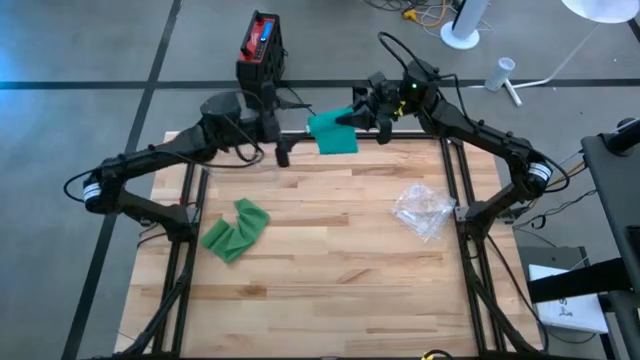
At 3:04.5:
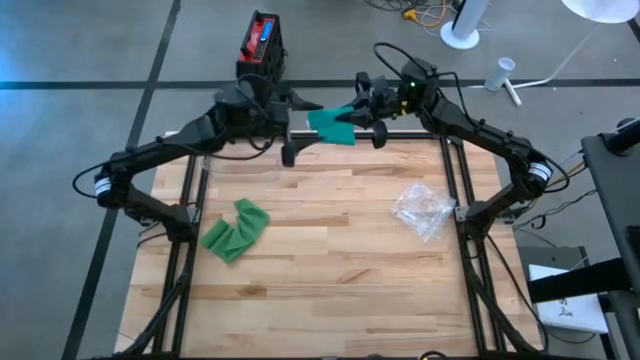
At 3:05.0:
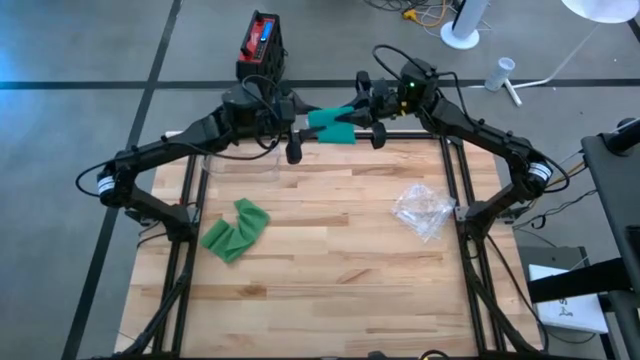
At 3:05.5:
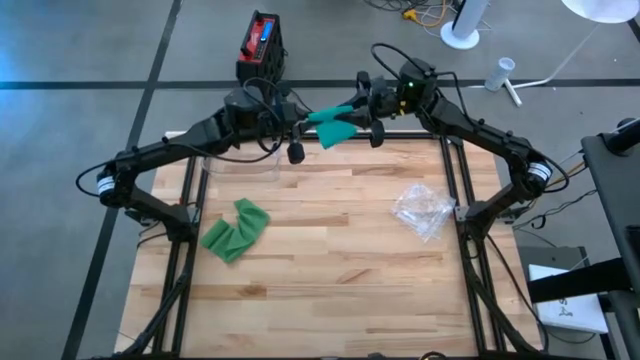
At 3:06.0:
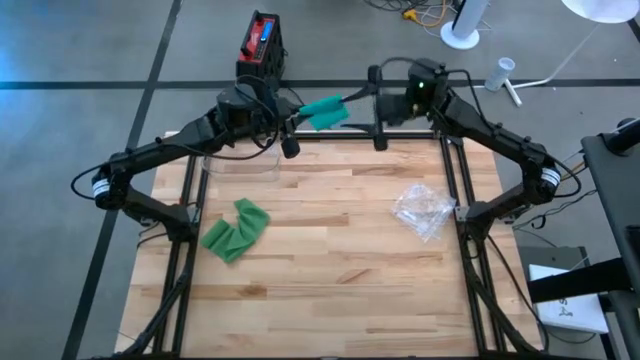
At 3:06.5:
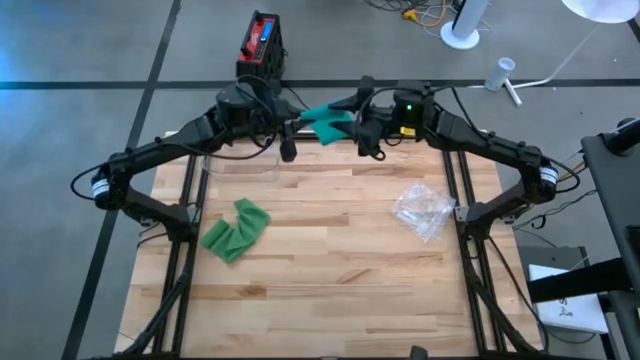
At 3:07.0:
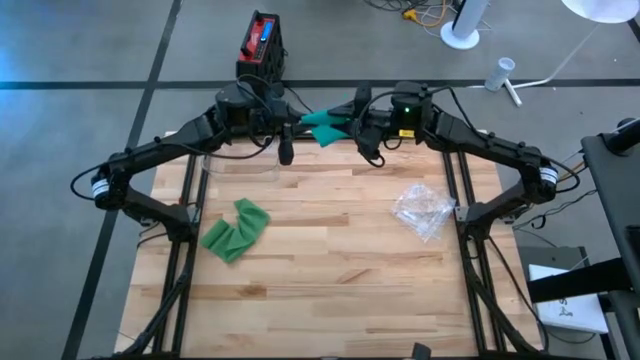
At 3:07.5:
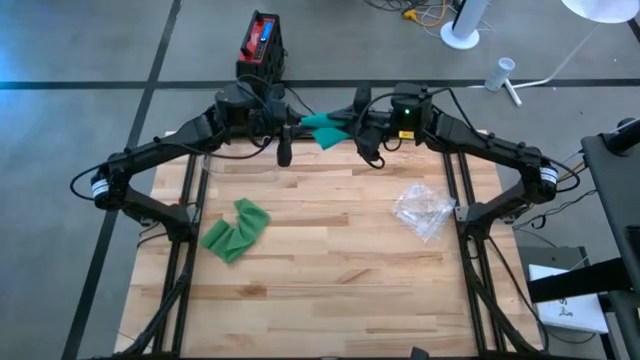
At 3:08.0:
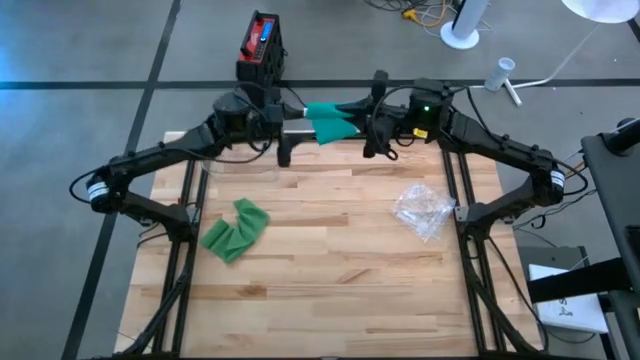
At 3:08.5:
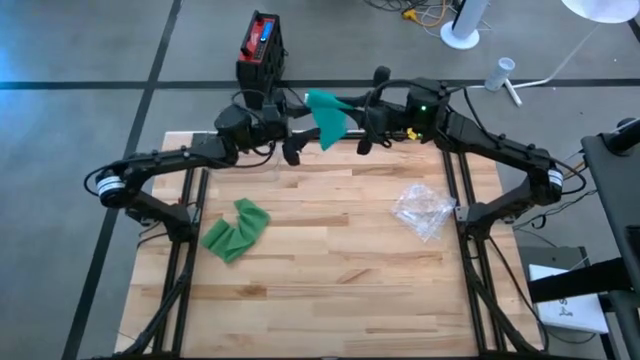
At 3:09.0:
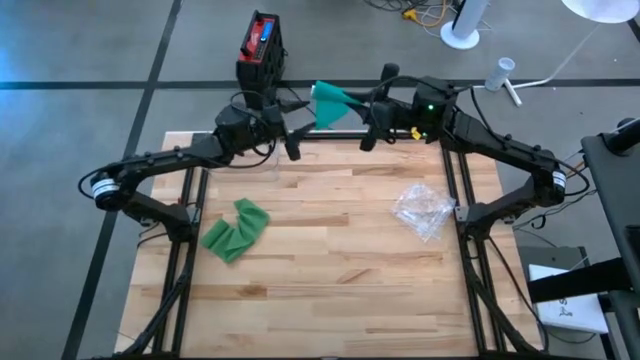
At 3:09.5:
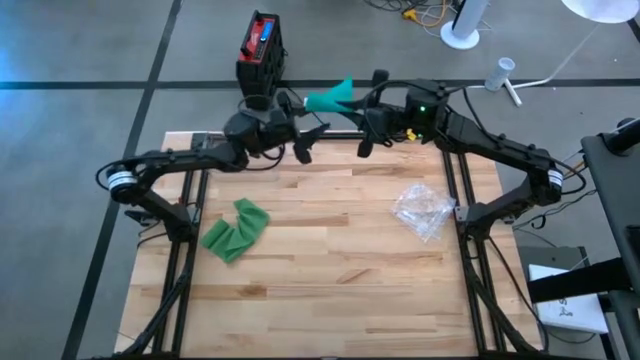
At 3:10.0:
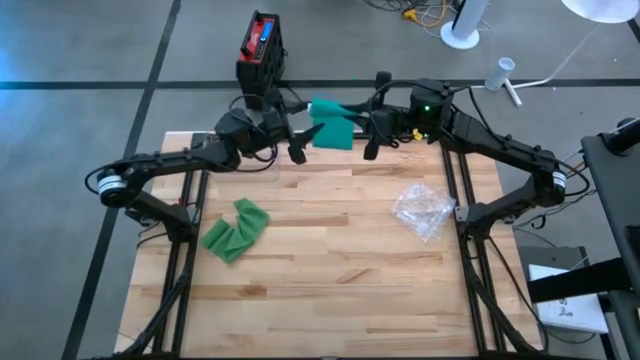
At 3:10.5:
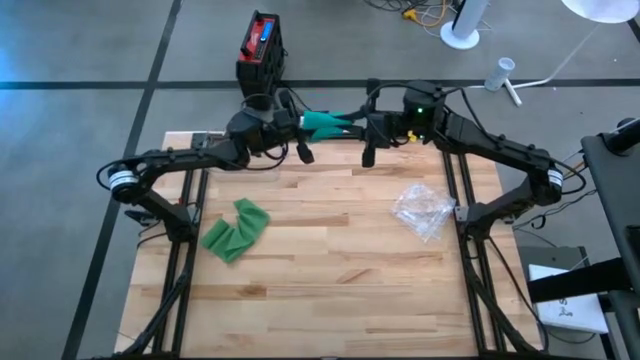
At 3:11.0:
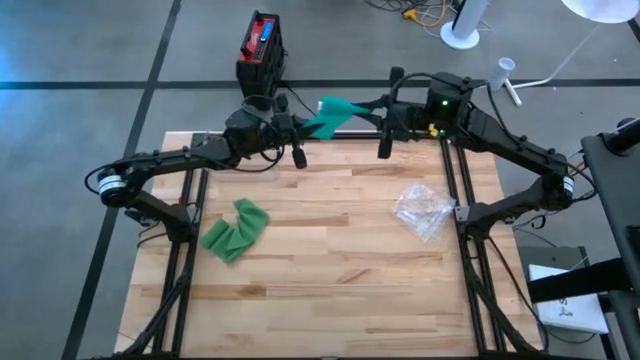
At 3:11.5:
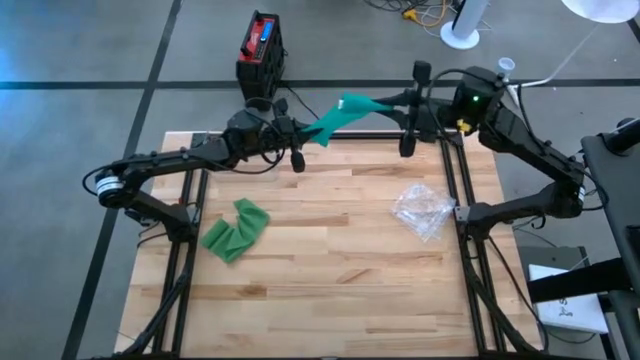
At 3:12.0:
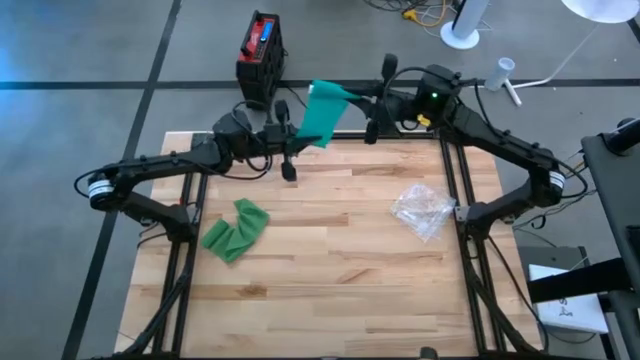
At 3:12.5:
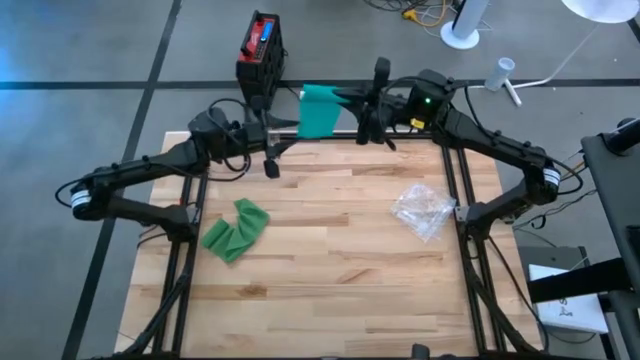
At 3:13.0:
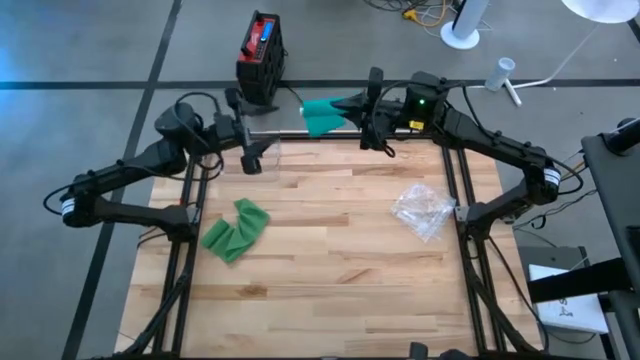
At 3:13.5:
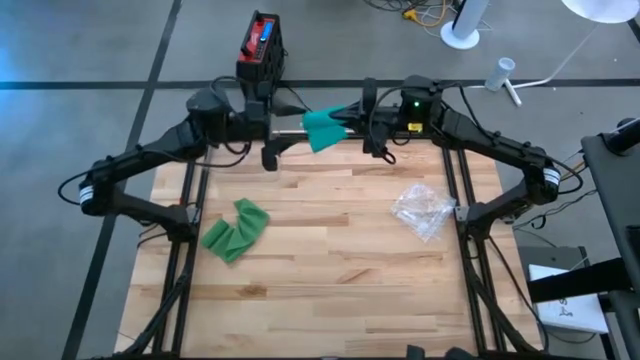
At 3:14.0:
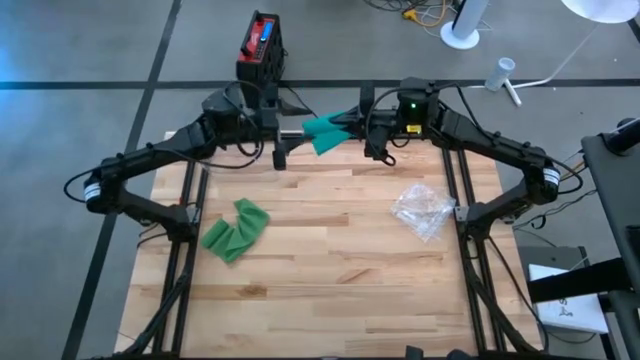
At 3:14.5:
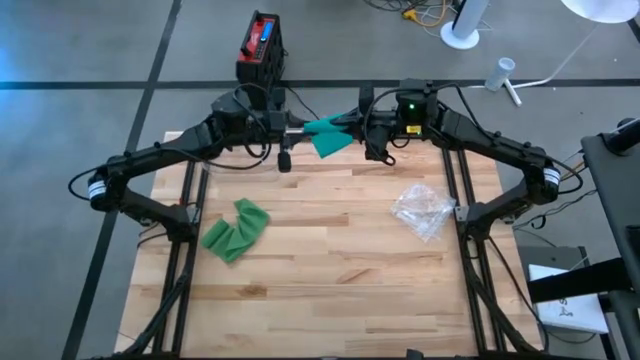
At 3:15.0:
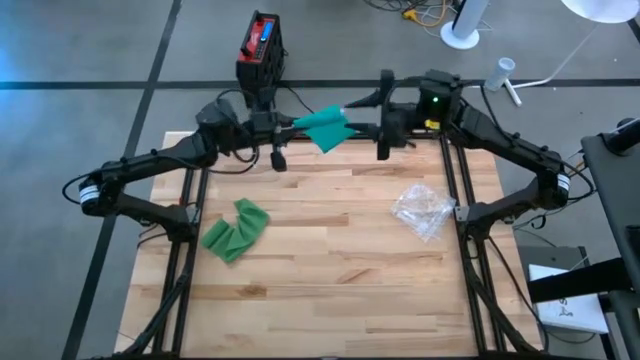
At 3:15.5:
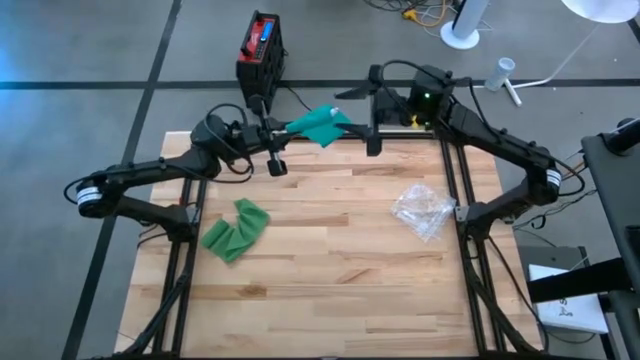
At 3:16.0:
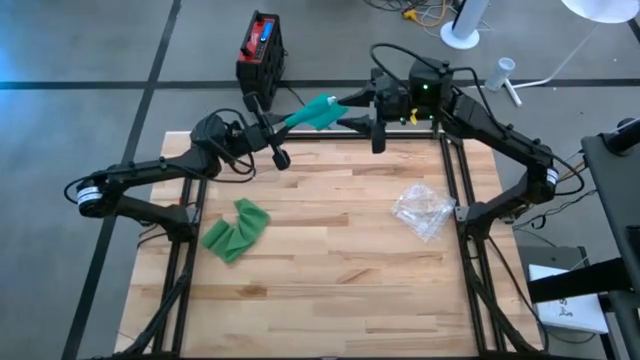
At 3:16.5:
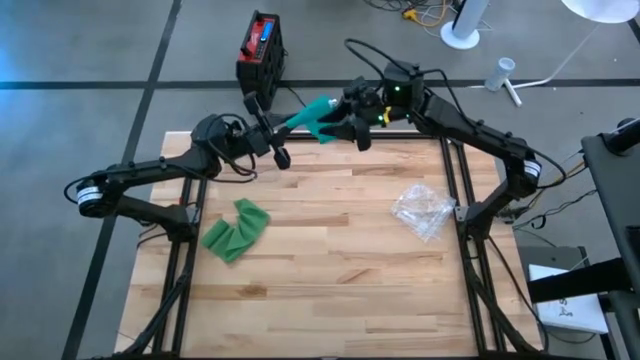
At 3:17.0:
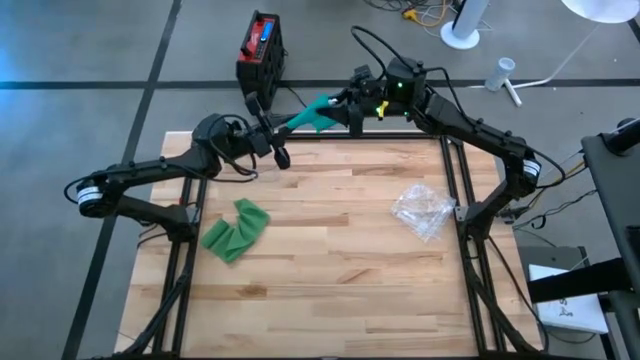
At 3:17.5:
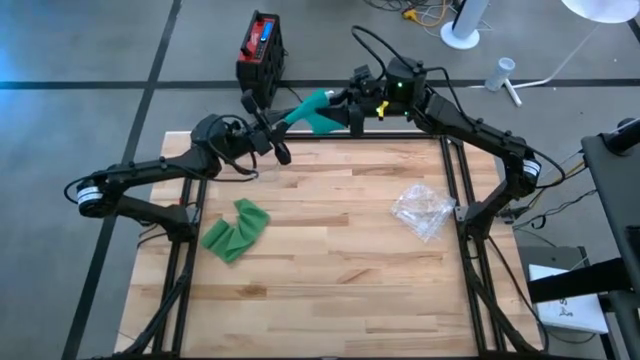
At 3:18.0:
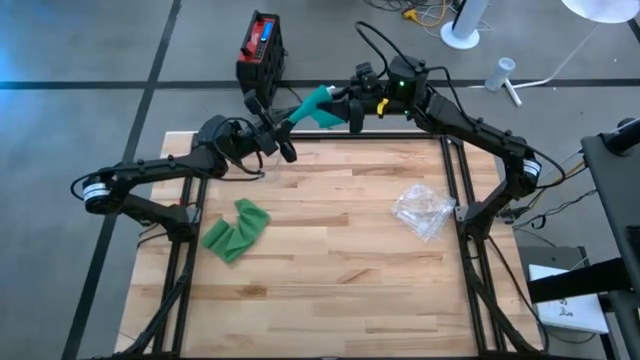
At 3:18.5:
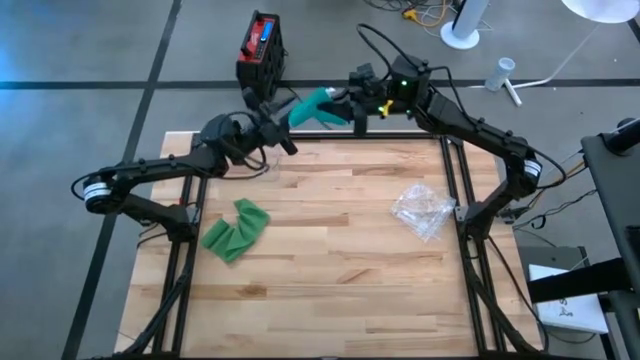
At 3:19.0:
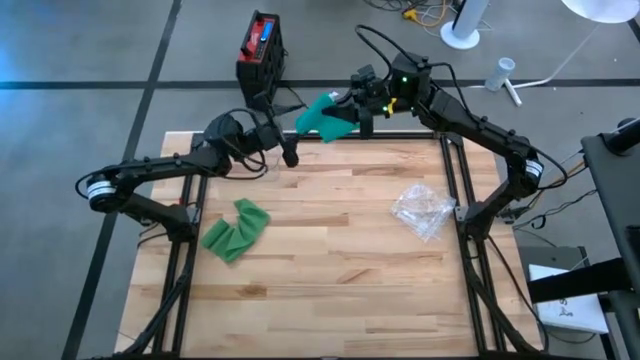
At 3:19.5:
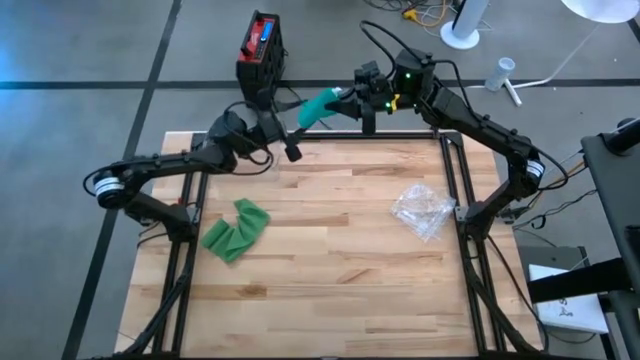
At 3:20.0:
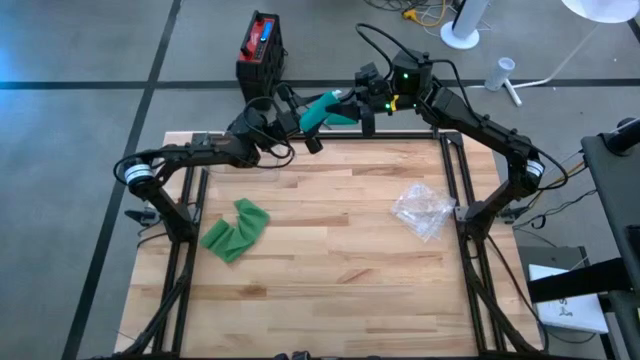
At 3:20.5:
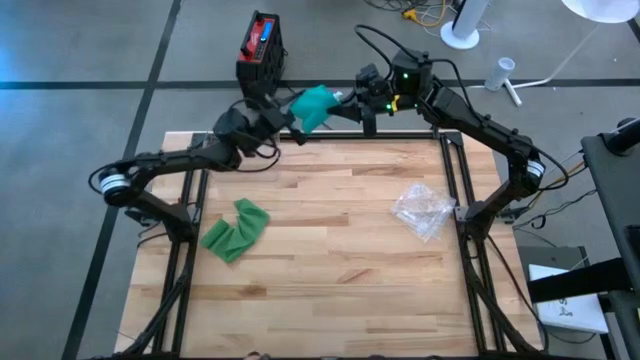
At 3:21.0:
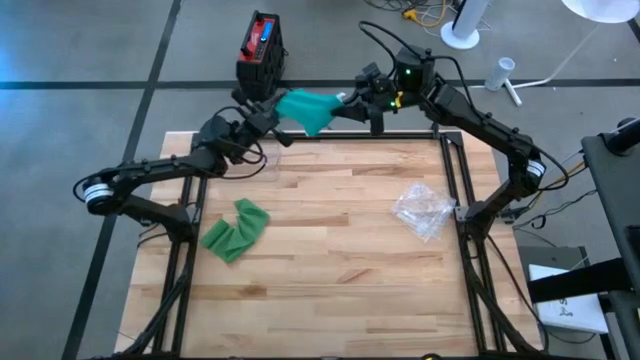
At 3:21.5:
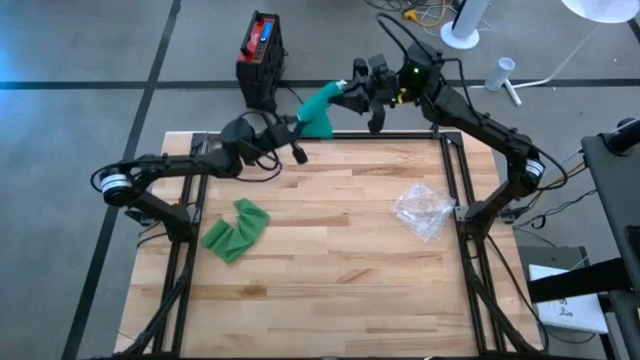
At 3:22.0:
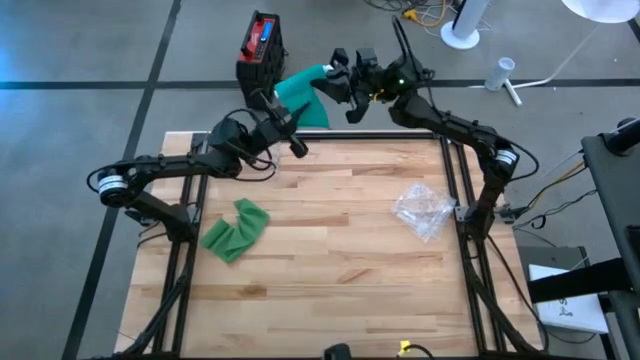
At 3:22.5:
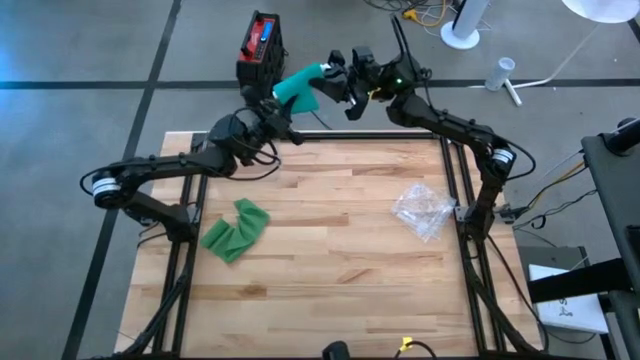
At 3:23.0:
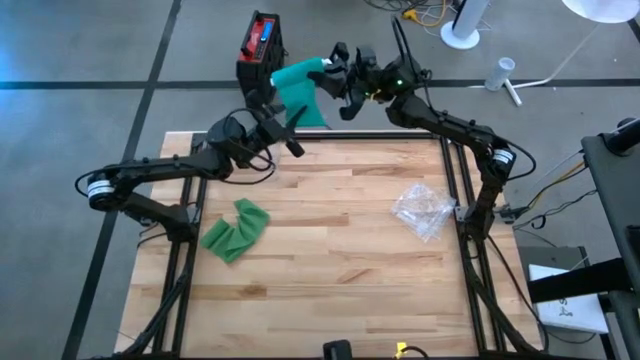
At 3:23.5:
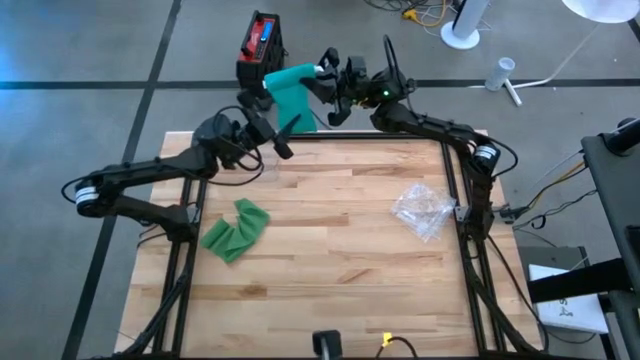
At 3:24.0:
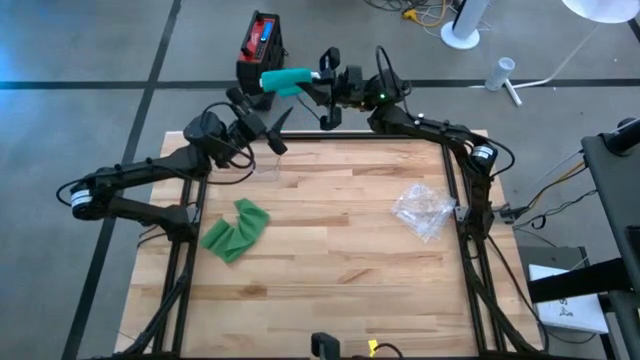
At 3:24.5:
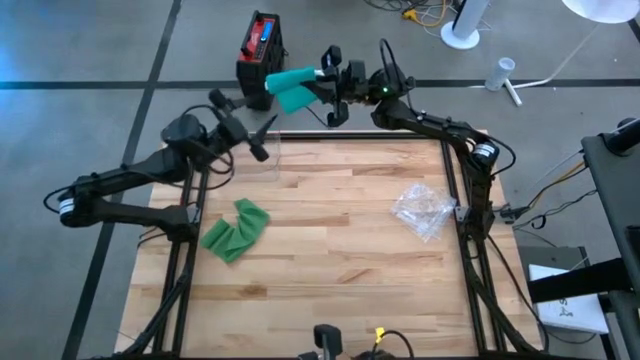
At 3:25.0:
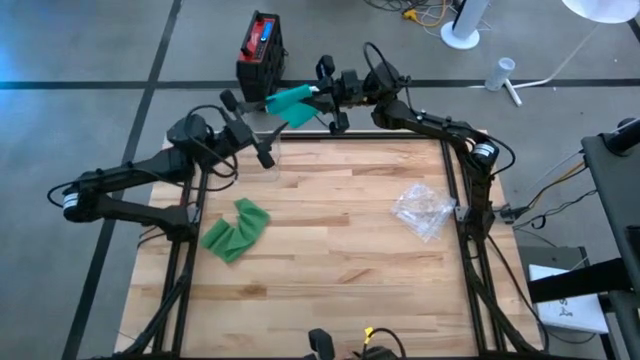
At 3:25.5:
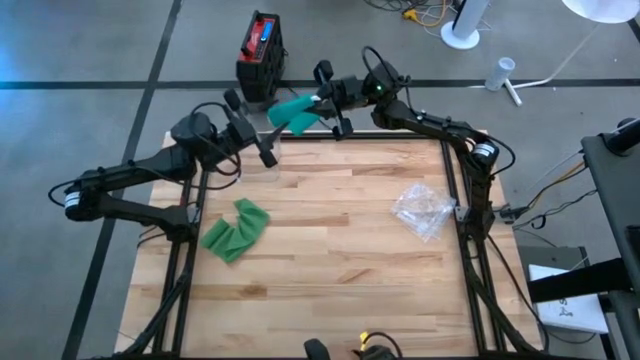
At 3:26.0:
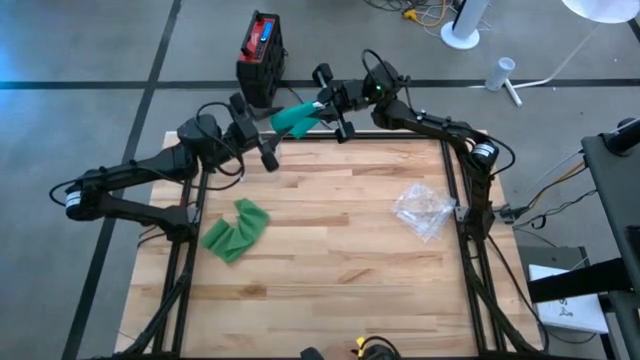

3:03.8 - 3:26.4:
Task: Roll bandage
Roll the blue bandage
